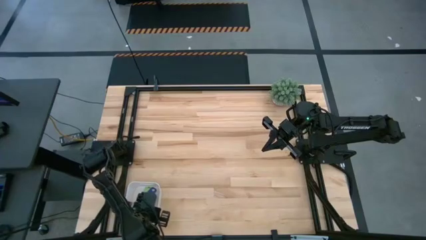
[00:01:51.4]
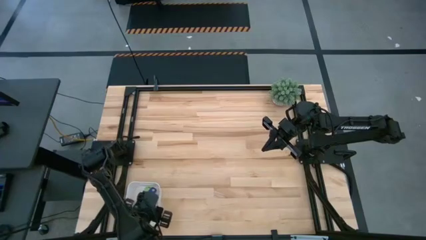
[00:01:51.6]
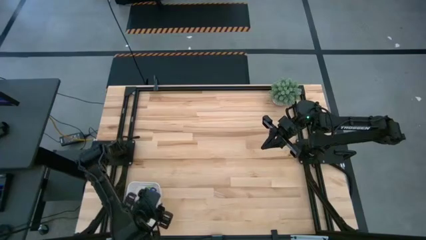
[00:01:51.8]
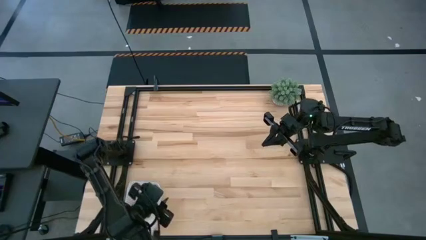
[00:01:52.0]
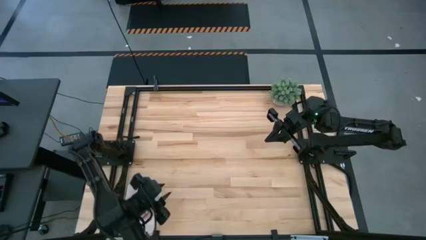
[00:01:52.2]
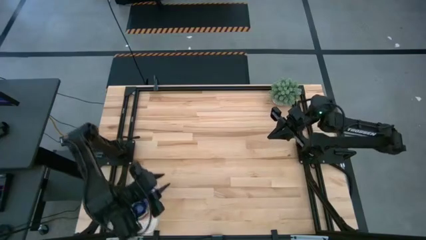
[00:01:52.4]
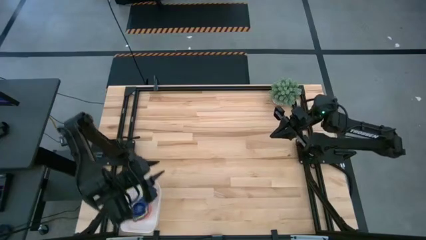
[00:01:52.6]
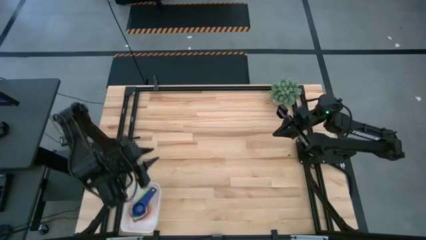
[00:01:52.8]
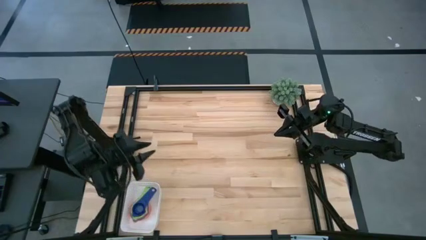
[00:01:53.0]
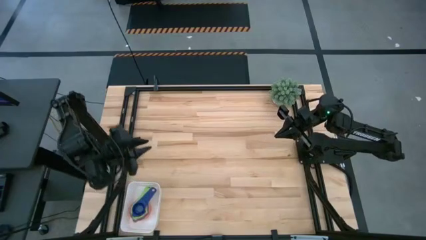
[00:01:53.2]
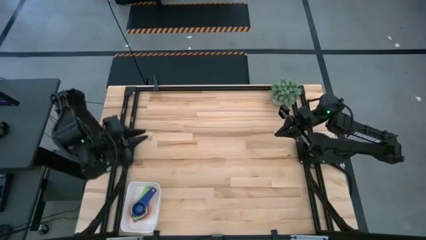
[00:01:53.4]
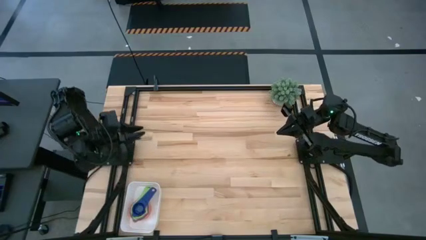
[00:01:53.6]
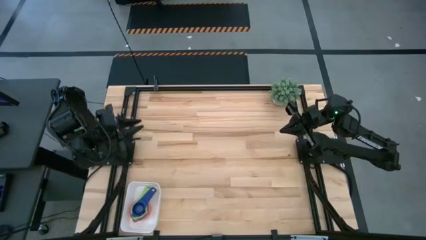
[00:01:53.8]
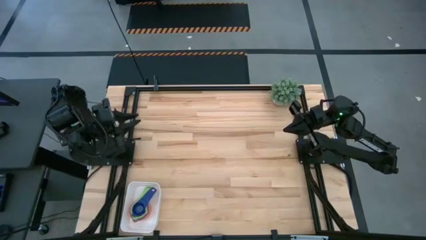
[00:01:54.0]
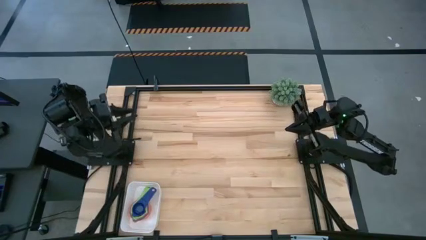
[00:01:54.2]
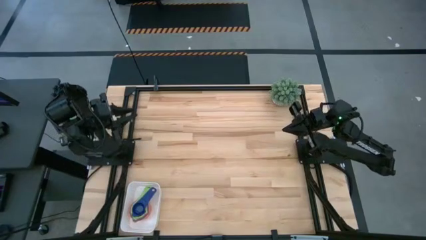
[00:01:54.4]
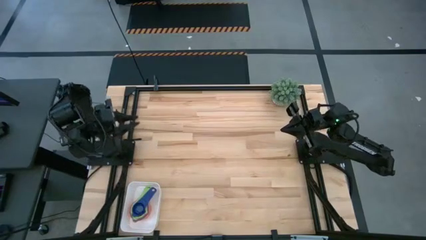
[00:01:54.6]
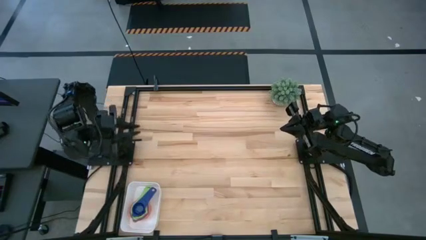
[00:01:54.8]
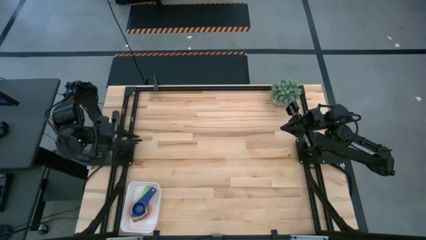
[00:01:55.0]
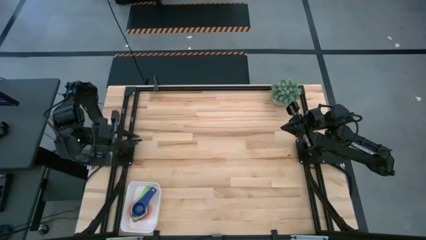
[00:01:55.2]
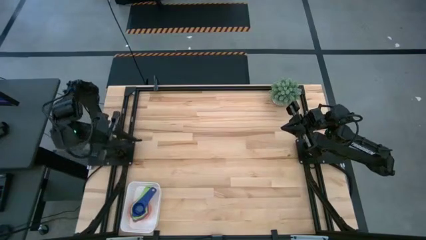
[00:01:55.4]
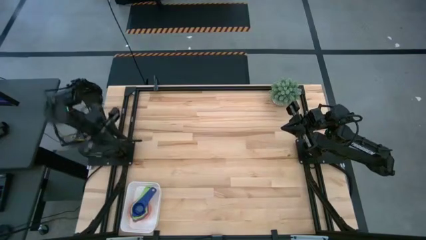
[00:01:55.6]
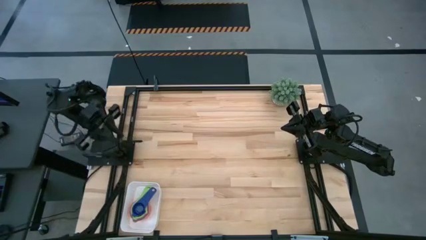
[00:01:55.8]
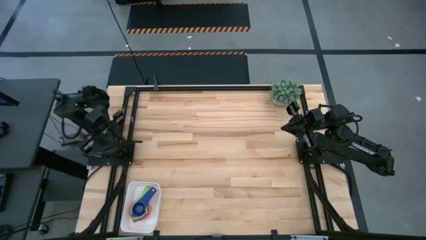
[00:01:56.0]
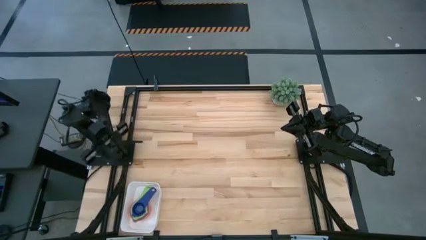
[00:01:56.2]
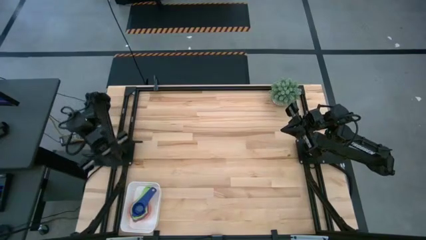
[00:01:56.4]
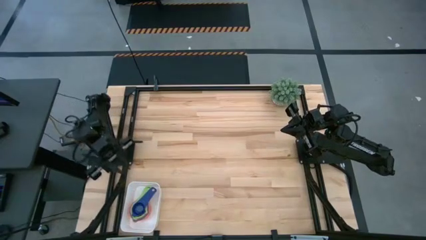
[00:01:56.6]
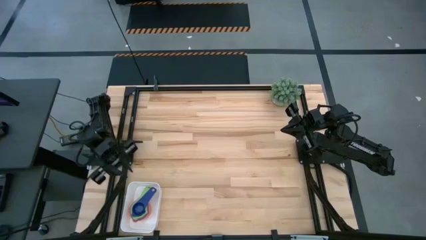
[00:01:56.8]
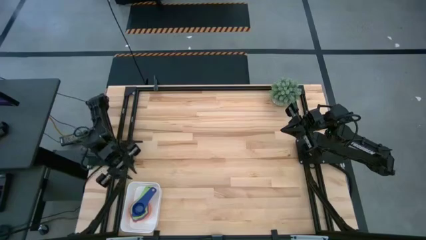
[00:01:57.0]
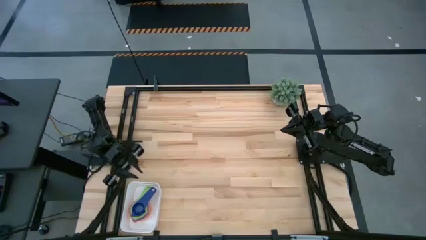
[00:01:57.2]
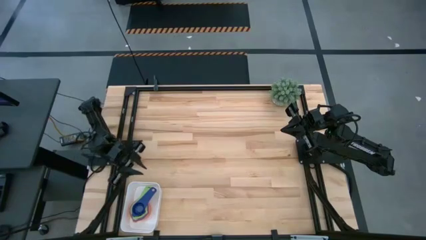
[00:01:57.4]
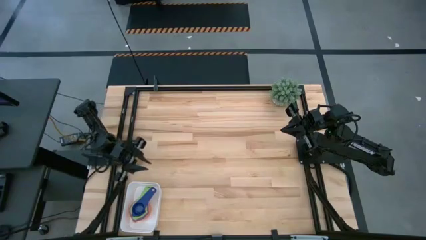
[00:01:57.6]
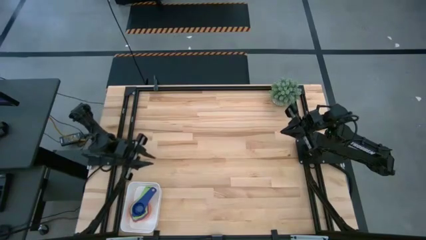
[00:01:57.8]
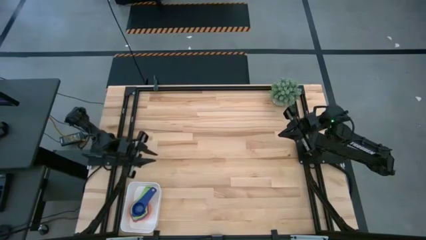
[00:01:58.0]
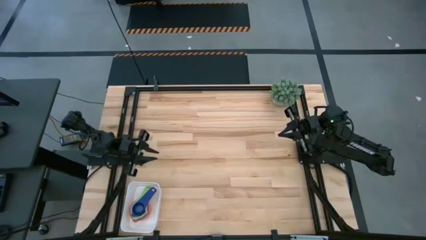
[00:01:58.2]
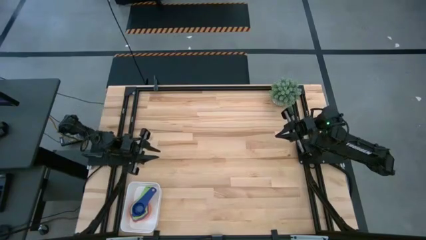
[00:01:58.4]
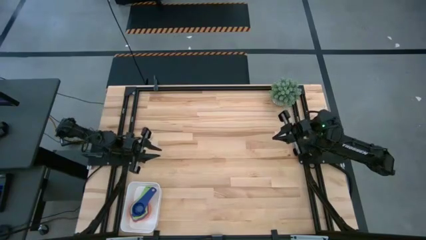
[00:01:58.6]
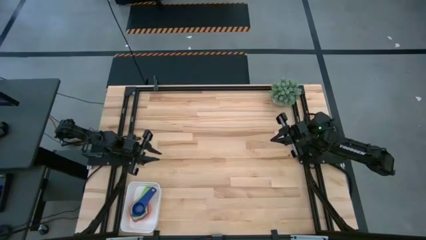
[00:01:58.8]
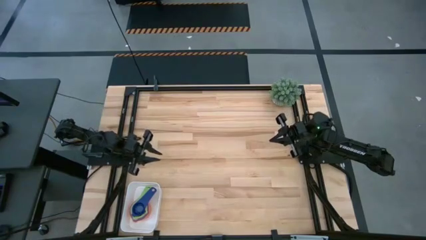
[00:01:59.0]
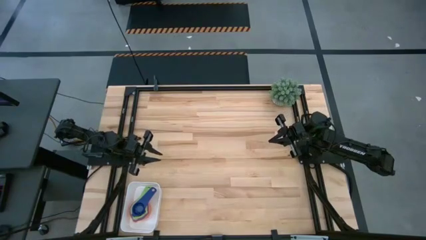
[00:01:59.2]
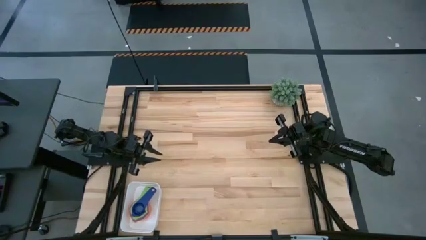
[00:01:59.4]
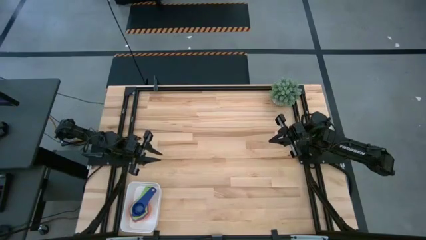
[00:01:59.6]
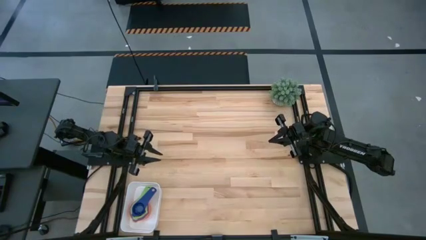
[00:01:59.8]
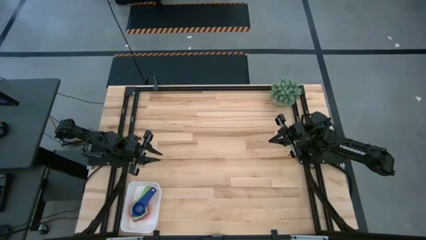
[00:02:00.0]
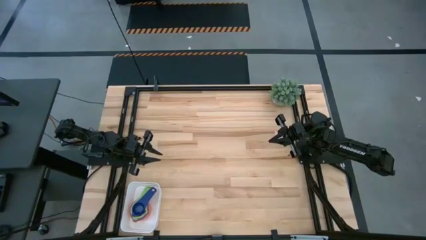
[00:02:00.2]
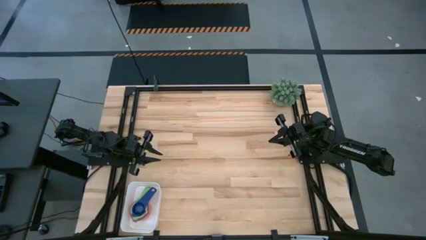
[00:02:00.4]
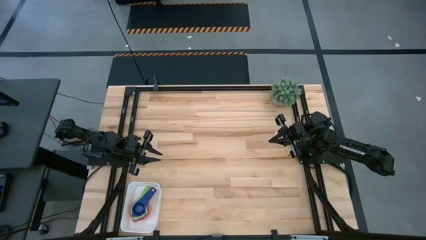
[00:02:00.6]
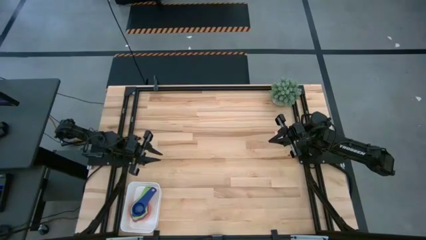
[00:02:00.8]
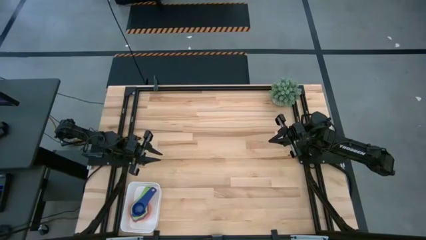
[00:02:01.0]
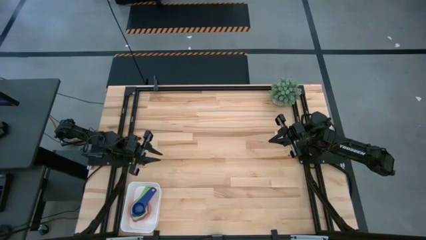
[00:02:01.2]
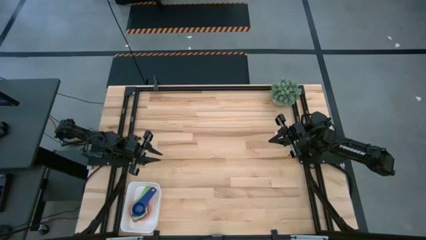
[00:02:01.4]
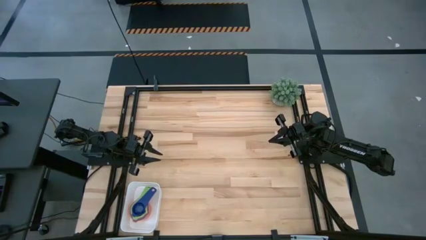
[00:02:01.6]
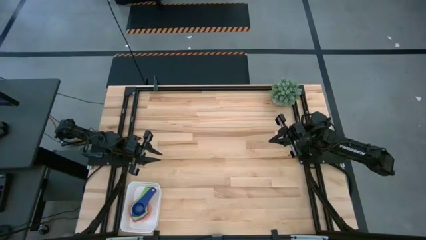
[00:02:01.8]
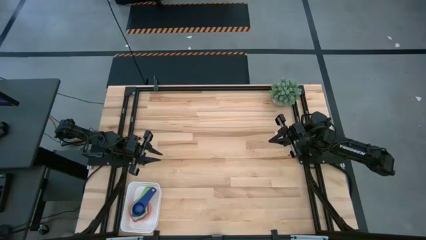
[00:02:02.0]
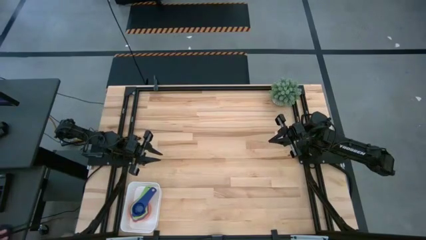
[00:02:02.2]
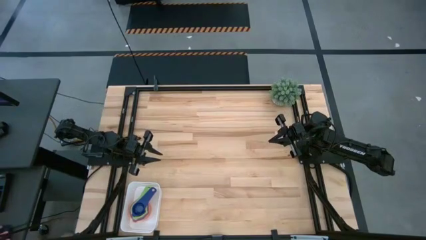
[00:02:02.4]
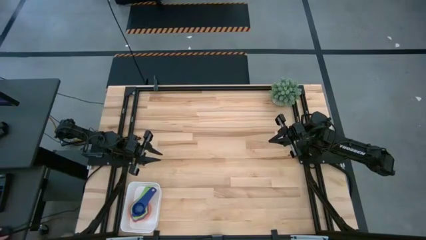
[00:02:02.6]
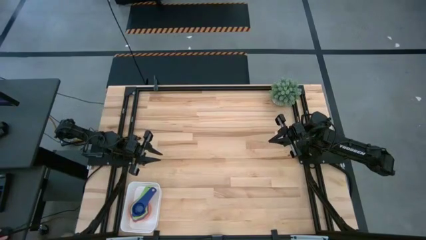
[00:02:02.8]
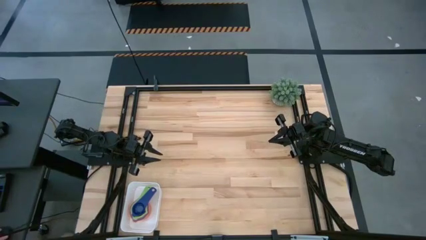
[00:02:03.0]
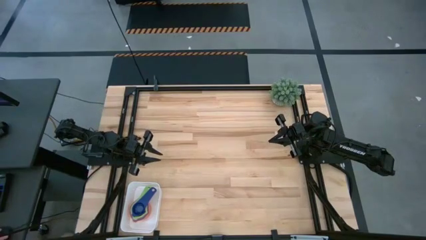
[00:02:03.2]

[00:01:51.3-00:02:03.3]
Task: Nest measuring cups in basket
Return to Home Position
